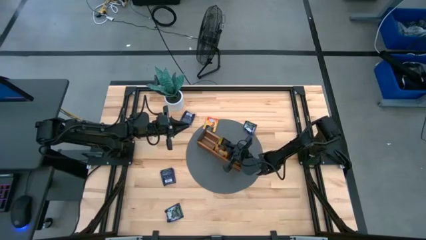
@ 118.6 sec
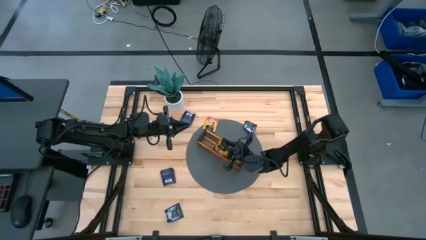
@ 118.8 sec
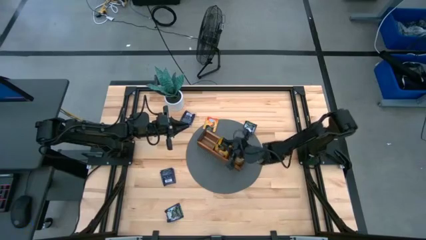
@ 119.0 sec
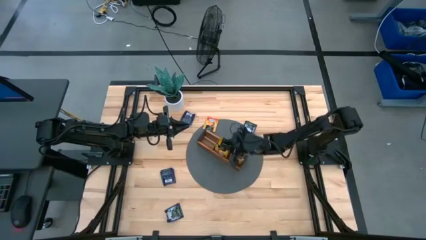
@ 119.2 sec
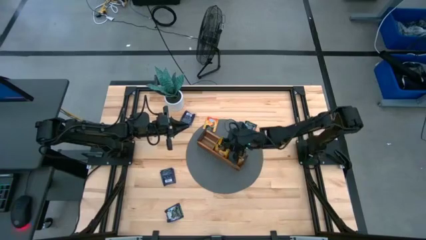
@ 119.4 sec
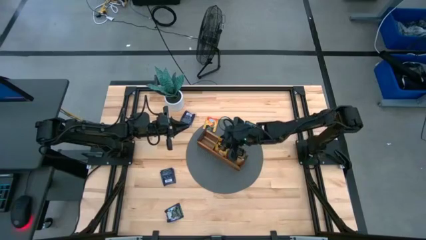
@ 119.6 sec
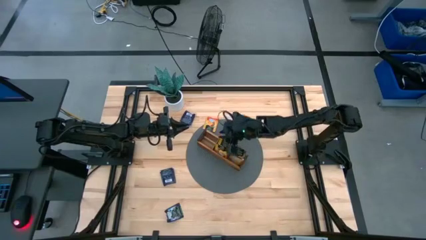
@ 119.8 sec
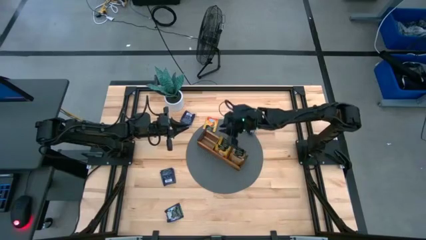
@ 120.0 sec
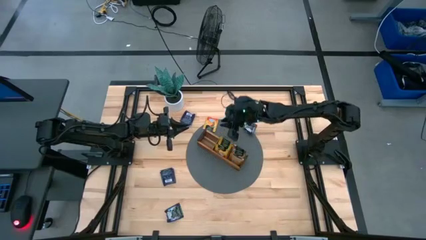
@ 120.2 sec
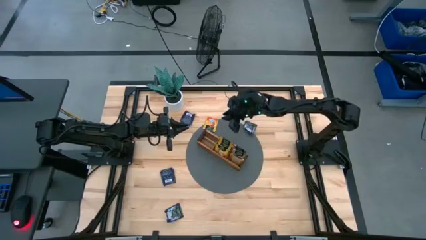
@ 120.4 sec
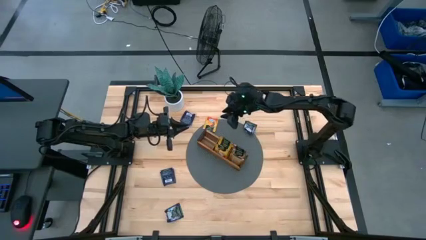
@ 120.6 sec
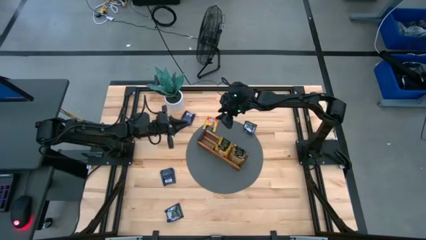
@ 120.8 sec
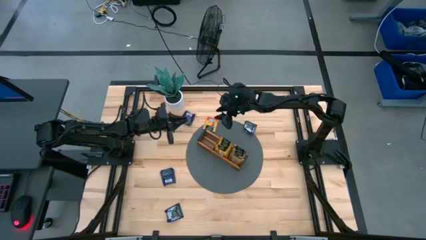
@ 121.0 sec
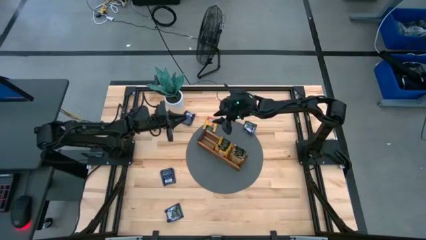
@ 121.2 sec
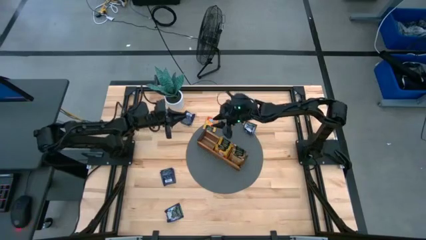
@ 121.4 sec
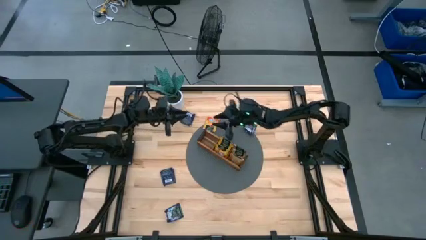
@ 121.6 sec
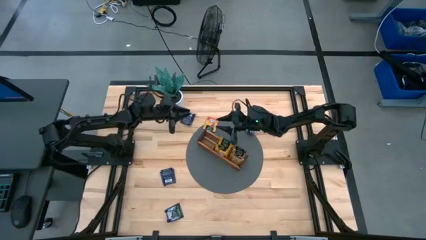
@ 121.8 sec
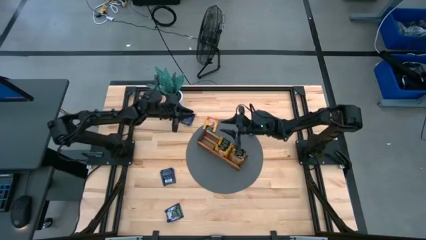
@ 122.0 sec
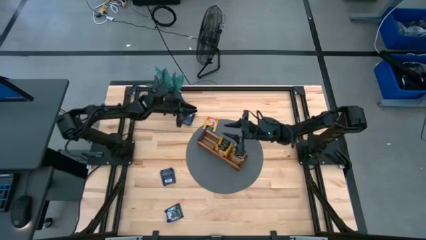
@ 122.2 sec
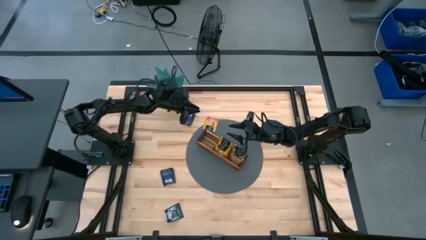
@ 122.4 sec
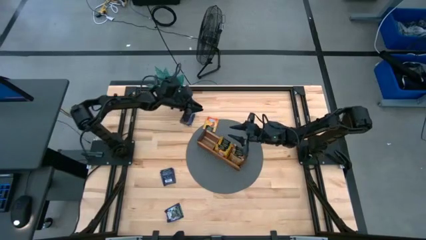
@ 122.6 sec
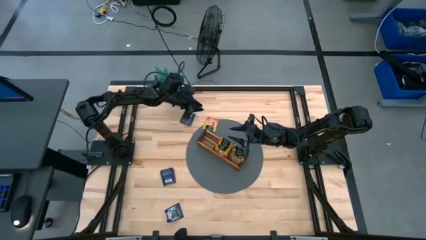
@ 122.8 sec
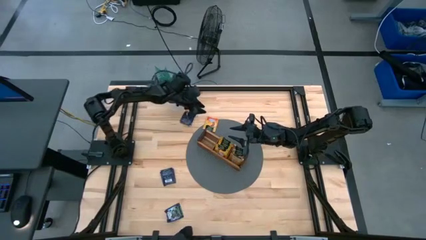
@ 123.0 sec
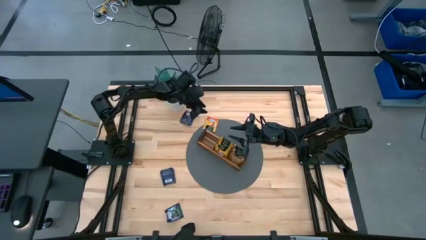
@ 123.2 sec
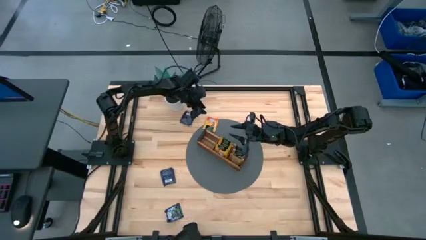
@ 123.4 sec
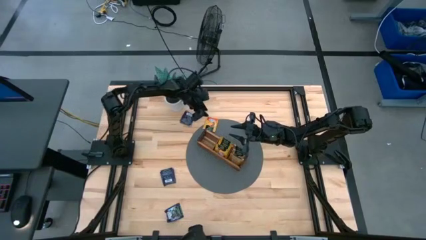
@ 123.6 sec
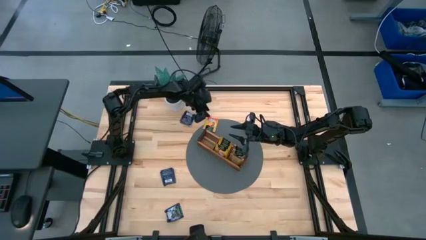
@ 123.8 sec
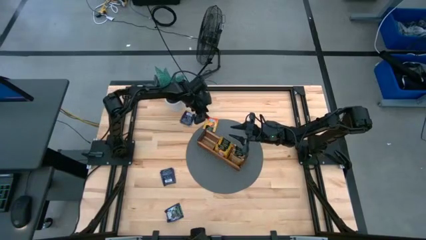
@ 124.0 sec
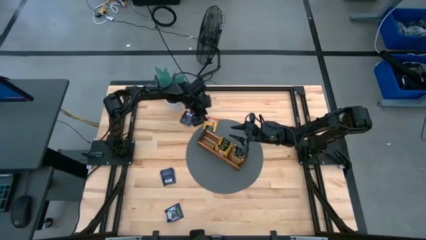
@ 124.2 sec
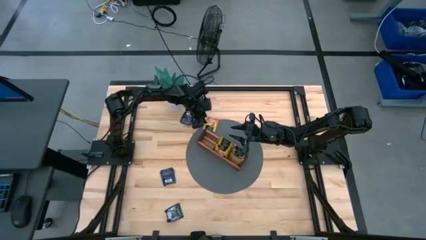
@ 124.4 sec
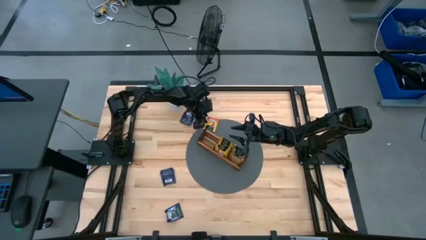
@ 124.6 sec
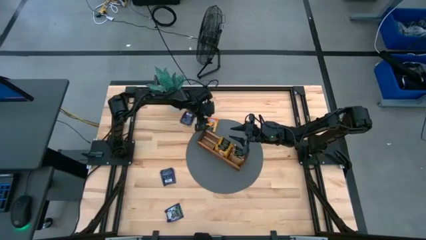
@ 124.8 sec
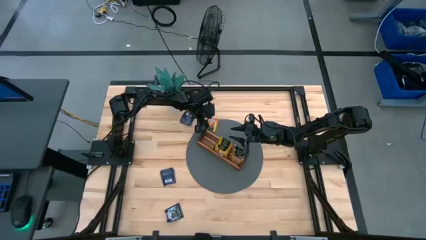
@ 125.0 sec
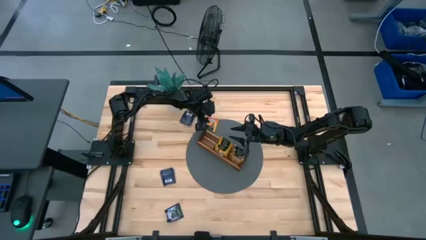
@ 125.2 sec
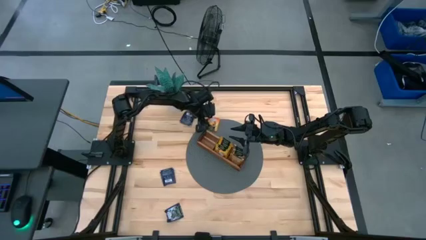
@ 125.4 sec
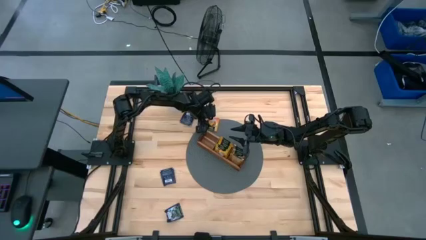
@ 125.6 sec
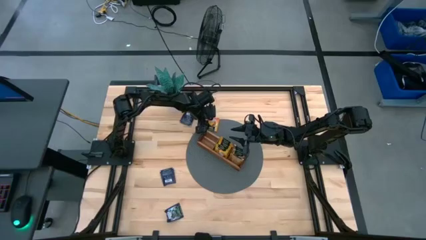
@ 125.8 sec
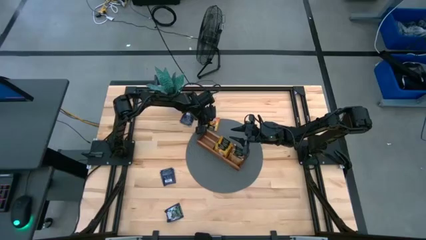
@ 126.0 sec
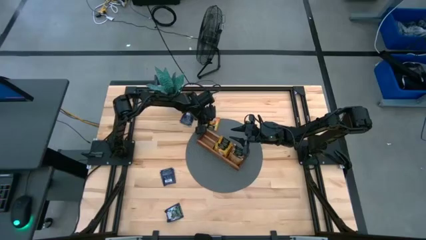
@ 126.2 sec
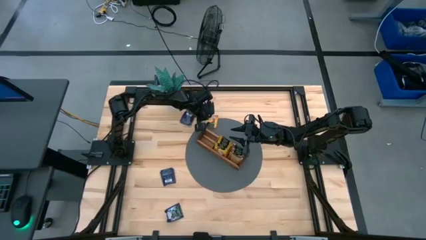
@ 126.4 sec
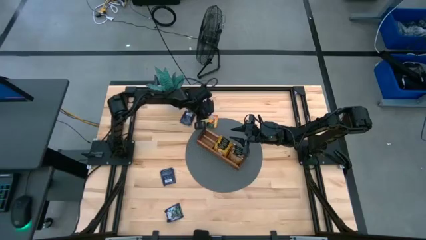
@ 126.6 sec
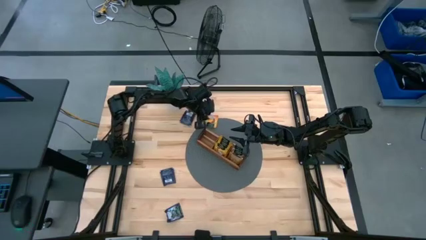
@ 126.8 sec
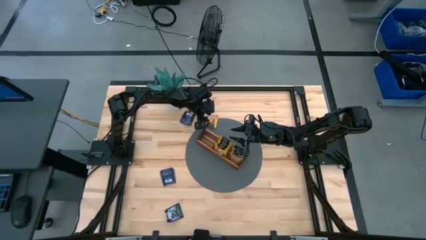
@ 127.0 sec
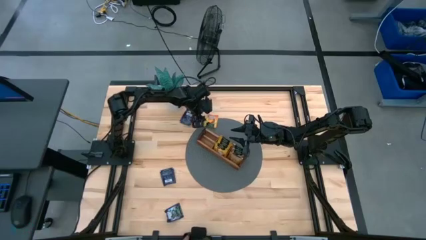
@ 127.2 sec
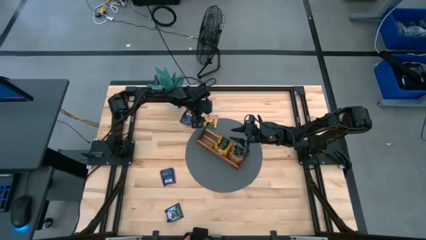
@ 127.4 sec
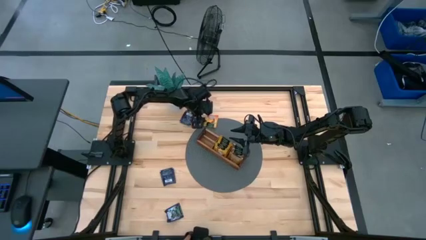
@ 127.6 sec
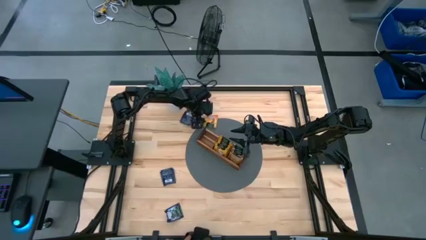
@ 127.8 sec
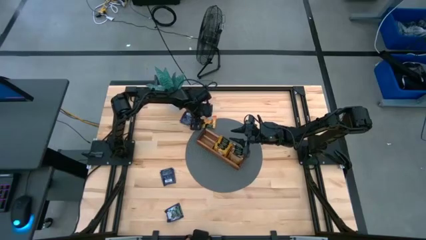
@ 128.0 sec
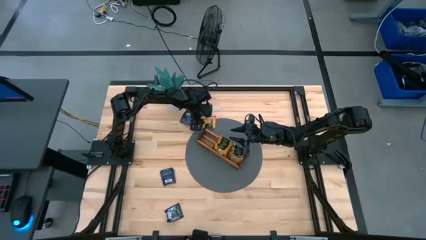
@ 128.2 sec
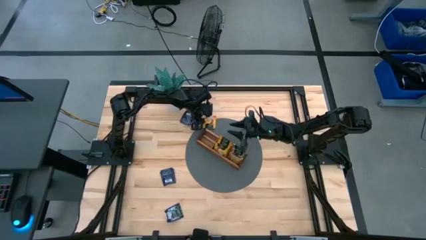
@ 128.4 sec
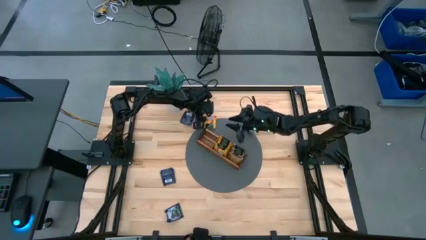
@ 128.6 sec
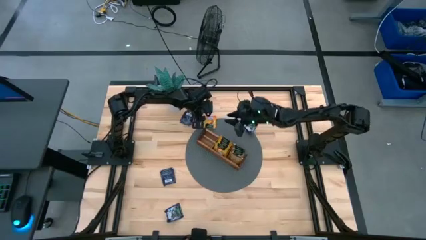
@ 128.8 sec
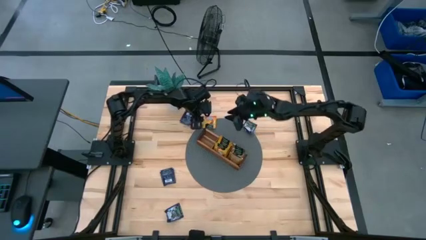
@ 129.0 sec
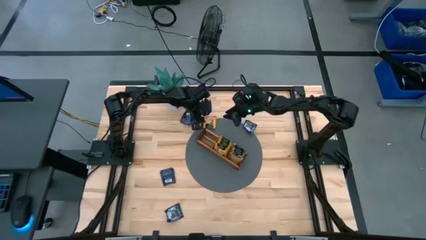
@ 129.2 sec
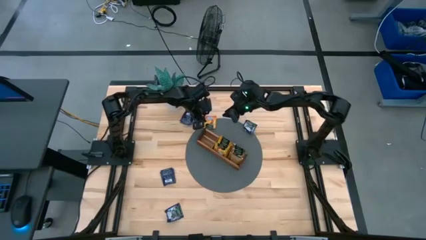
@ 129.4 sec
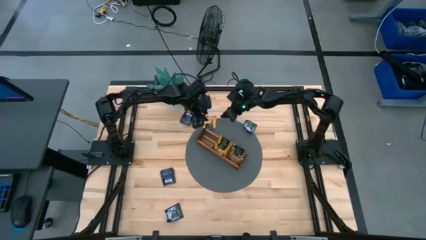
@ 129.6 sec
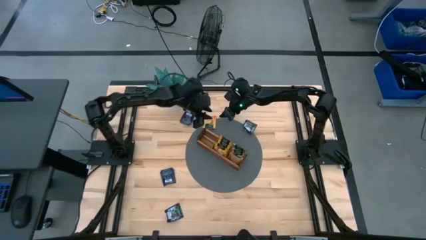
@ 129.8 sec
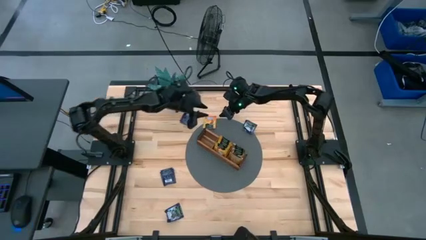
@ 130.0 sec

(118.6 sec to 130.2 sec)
Task: Pick & Place Tea
Put the orange tea bag into the middle section of the wooden organizer
